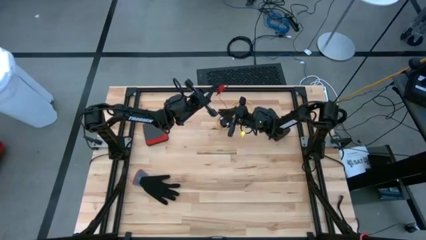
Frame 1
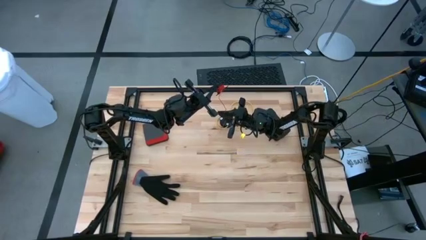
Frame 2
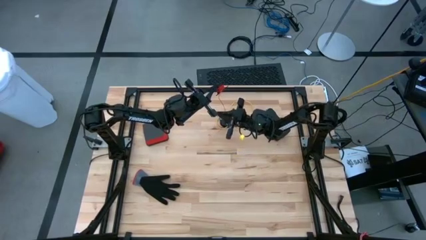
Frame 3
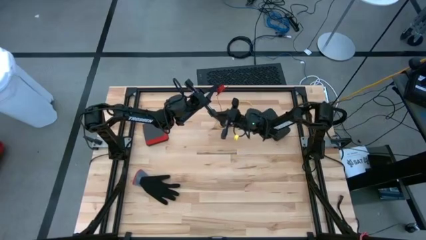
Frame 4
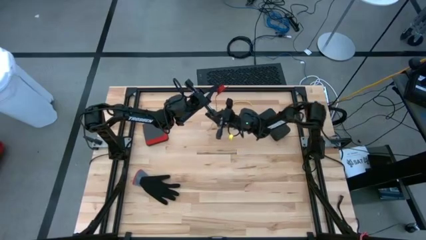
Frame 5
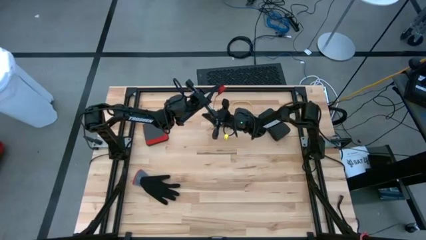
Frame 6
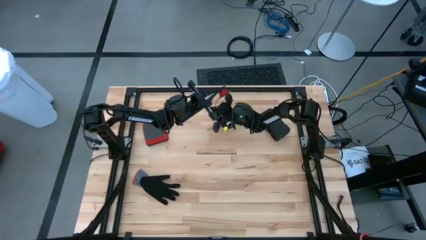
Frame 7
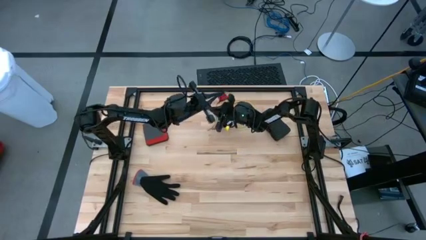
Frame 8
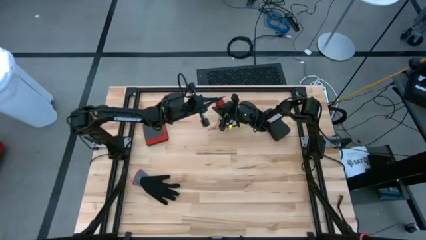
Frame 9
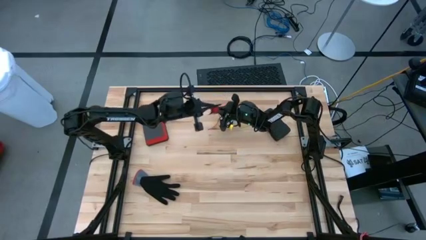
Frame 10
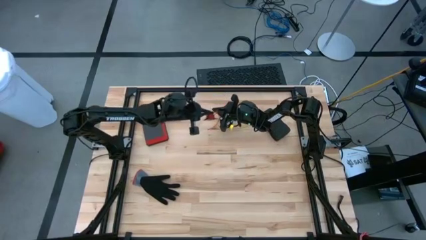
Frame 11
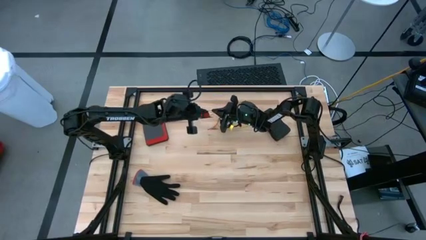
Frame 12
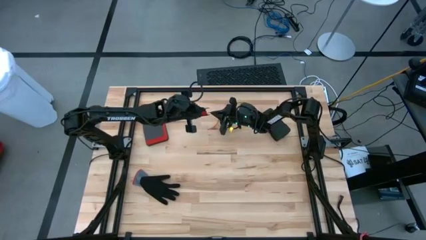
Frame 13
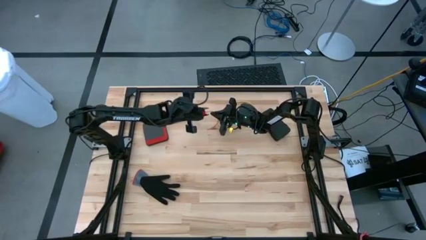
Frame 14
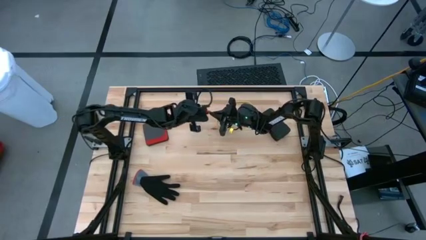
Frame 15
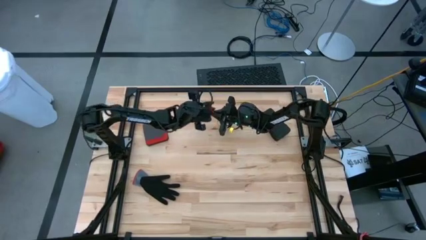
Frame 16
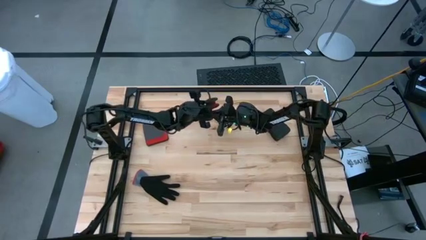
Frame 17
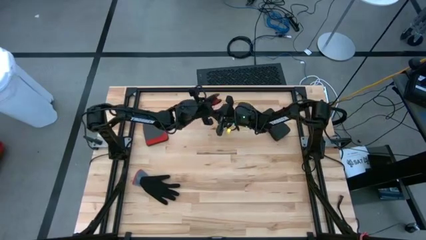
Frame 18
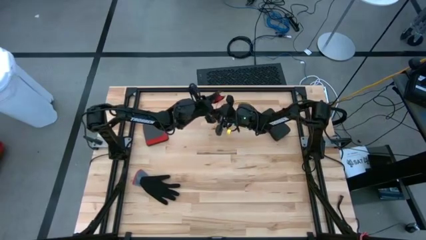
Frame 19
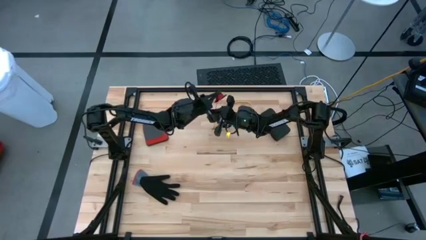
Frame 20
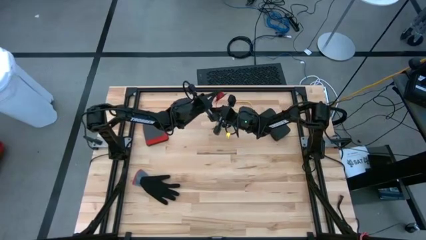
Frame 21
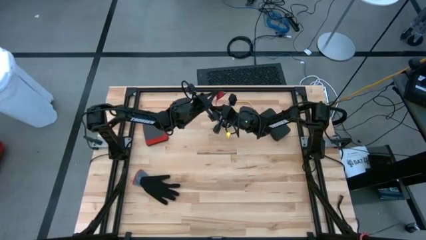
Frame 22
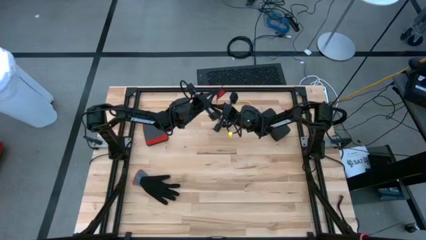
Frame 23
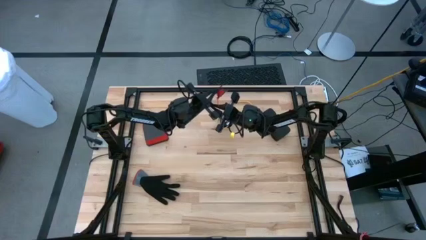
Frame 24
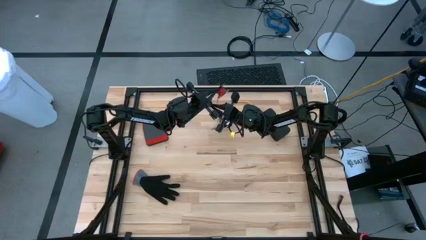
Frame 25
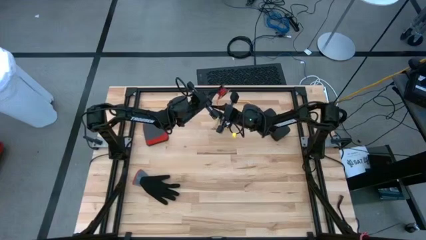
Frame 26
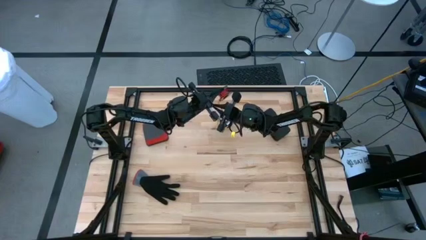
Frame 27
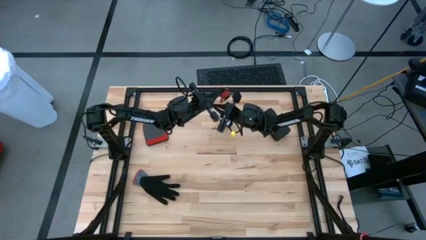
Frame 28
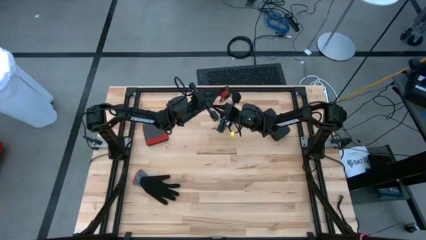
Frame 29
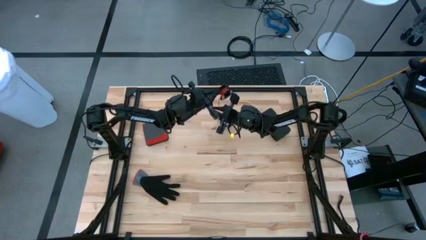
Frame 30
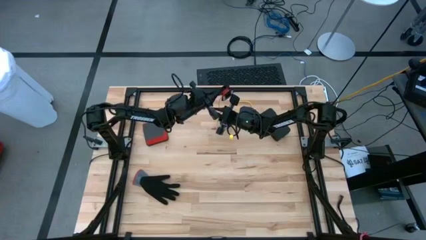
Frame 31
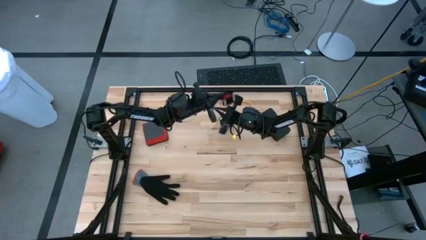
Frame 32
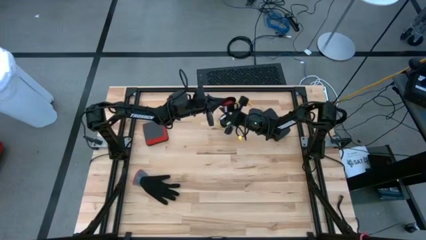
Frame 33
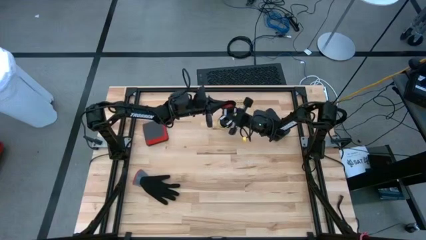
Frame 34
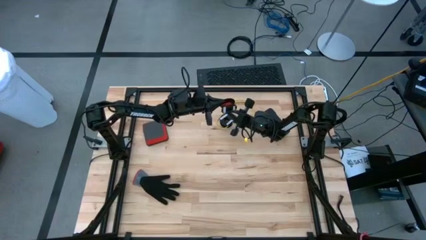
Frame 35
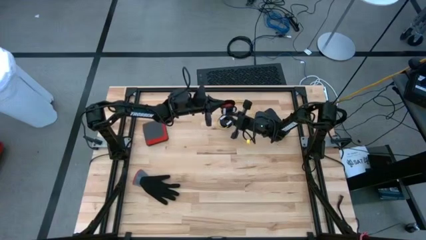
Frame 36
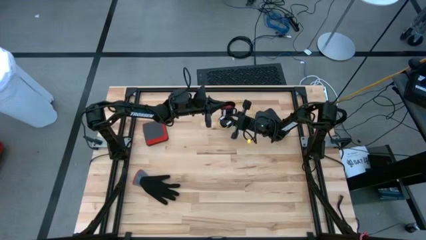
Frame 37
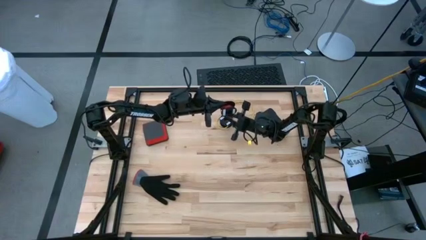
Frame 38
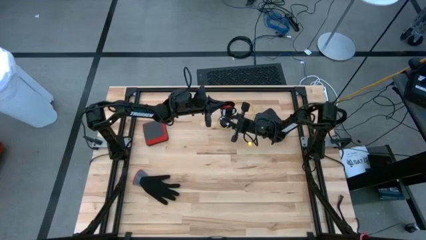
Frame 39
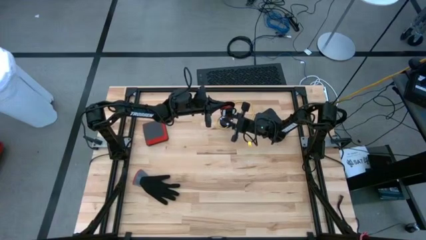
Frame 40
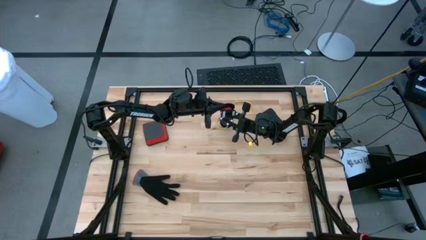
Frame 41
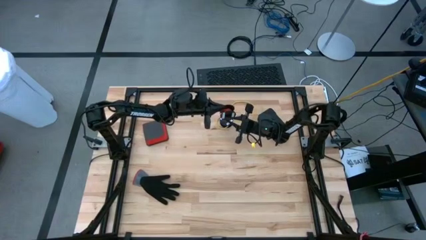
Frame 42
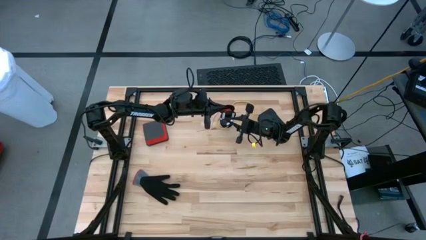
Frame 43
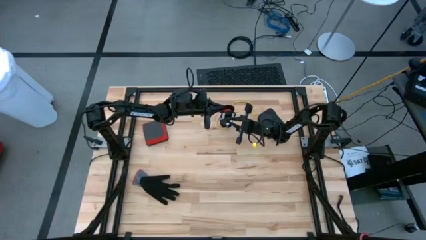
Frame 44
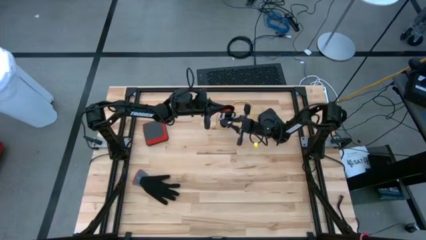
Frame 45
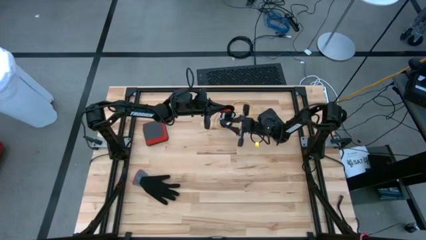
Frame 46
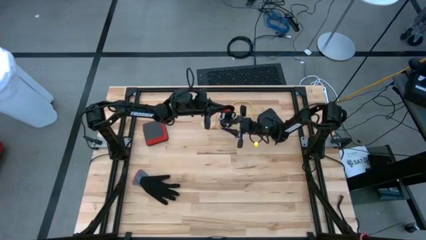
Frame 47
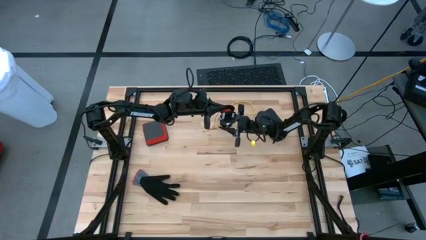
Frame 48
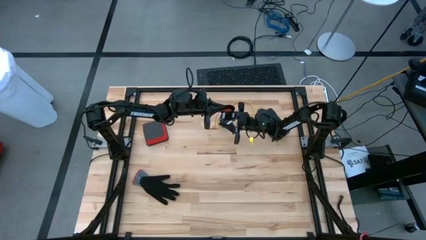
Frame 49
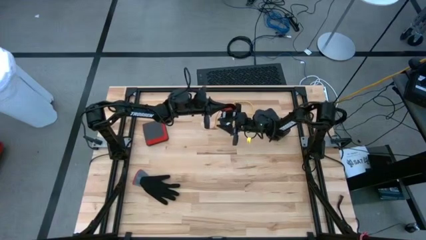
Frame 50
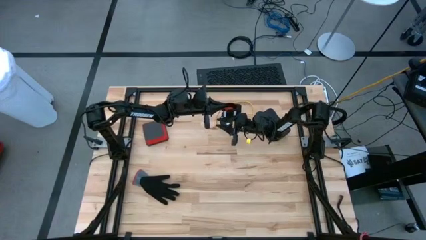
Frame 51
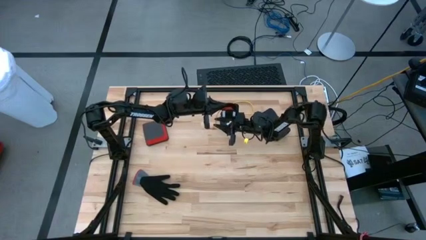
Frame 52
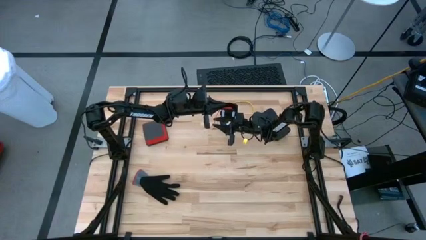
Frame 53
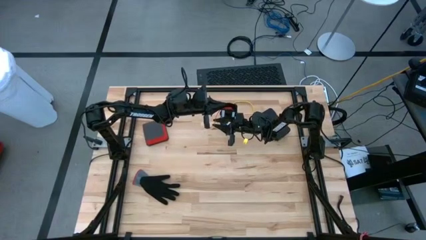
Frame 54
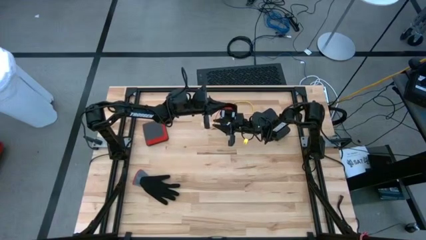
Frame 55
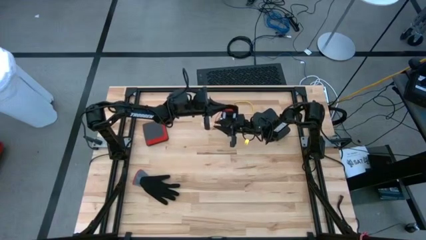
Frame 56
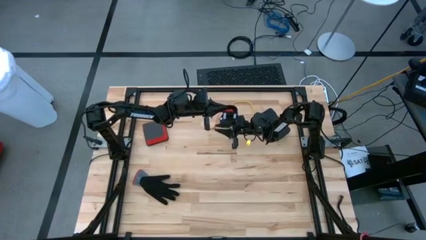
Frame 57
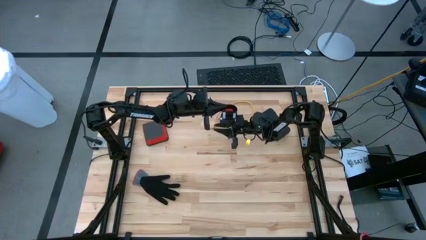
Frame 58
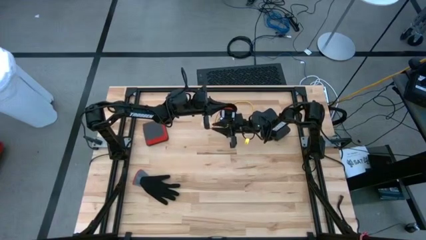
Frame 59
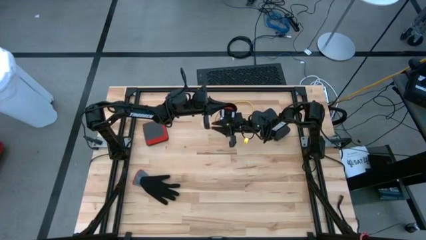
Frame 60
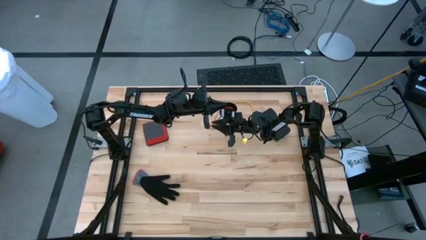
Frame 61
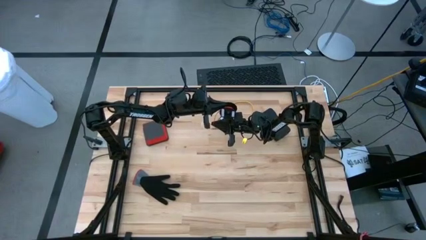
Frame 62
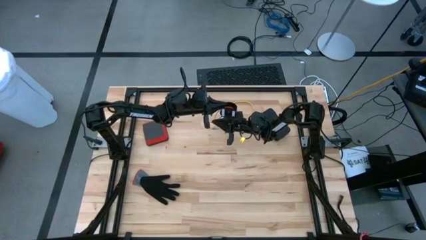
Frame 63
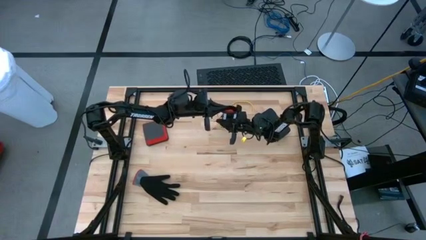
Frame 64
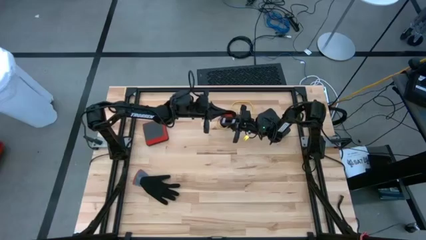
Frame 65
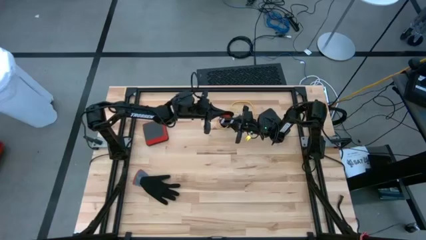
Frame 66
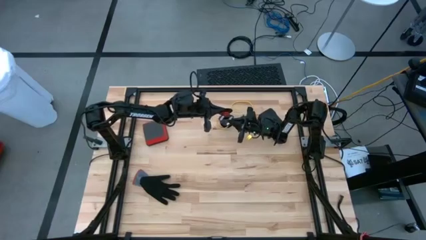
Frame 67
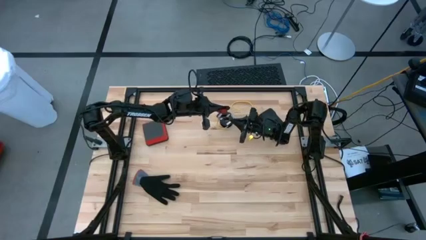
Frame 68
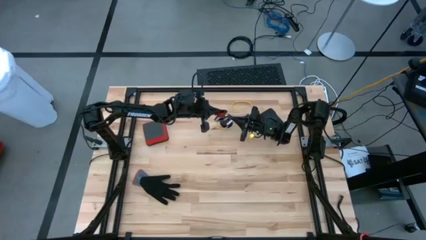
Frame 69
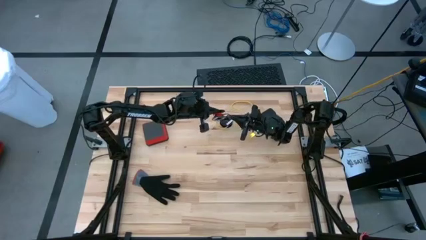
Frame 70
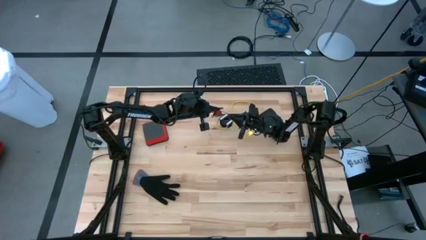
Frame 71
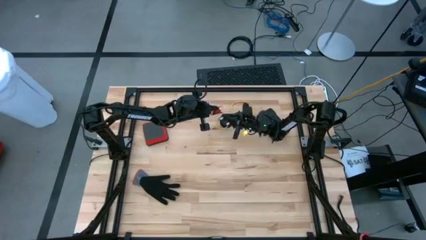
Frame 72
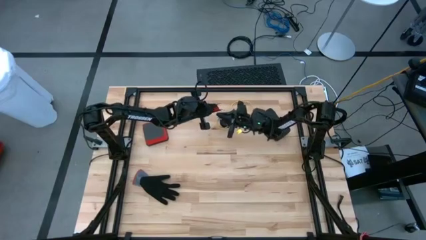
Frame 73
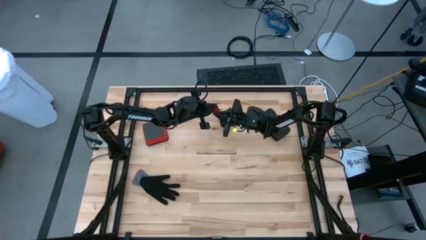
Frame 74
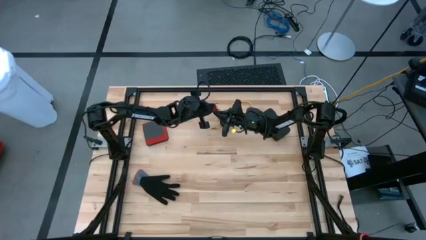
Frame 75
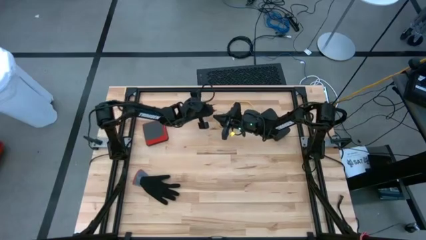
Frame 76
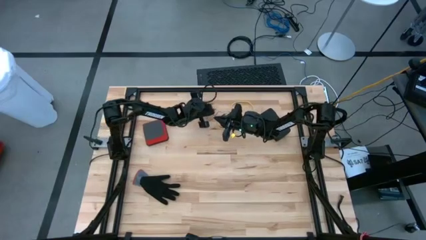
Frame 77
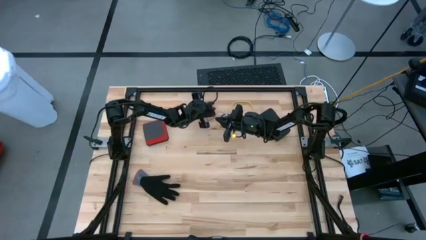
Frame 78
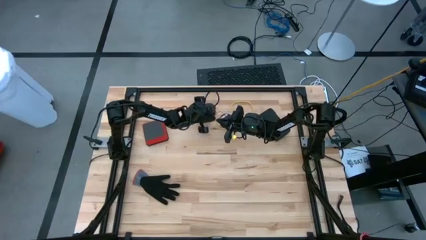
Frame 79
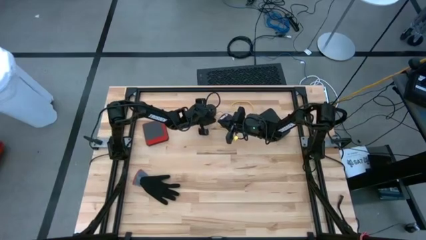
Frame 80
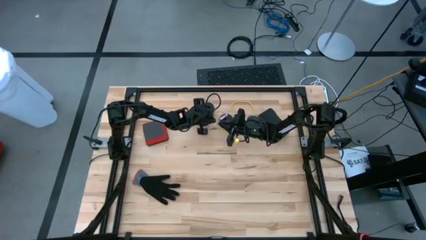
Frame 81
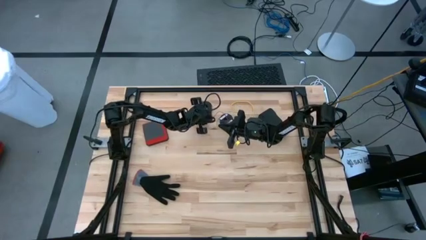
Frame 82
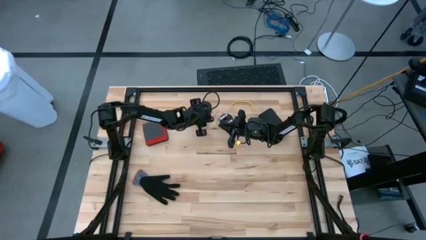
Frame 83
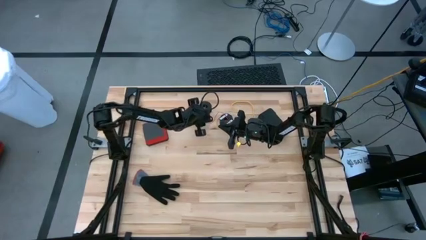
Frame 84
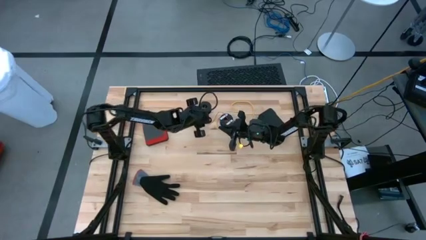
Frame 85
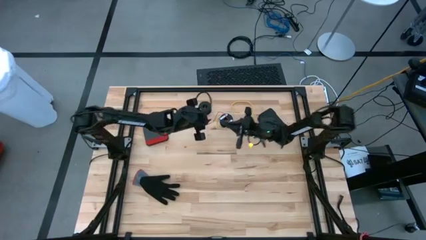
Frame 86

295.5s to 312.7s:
Task: Coil cords
Coil the red wire into the spool
